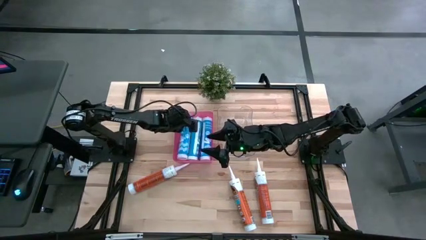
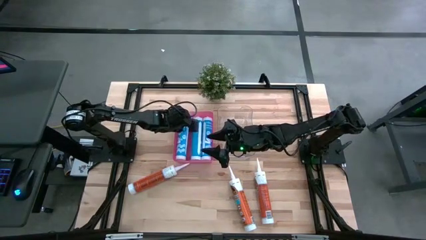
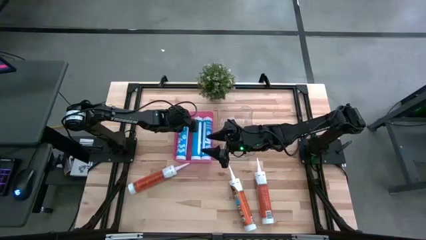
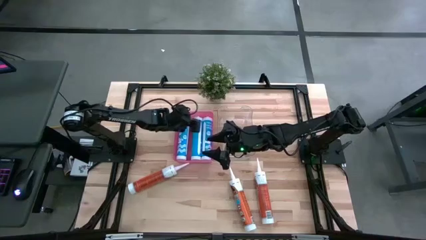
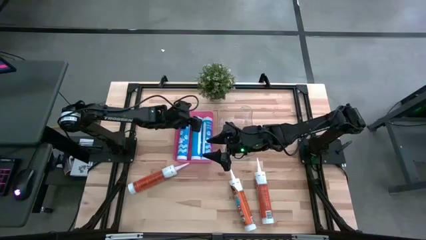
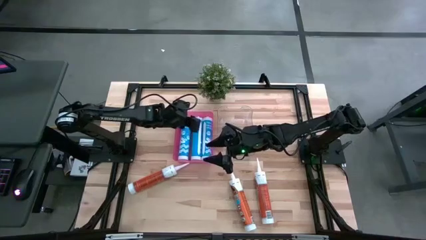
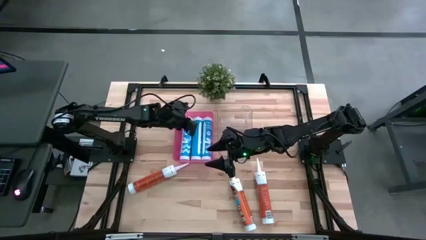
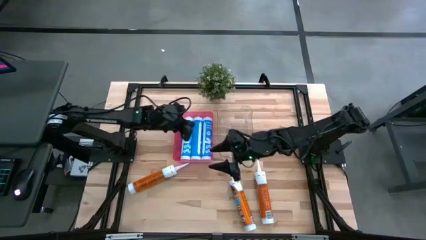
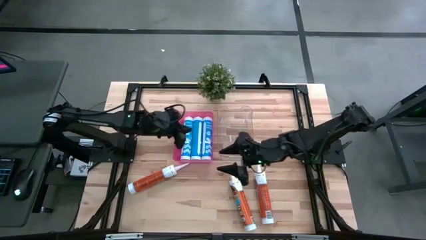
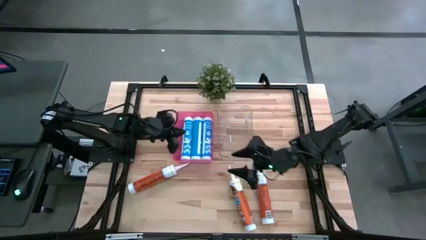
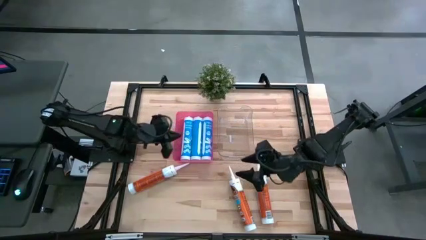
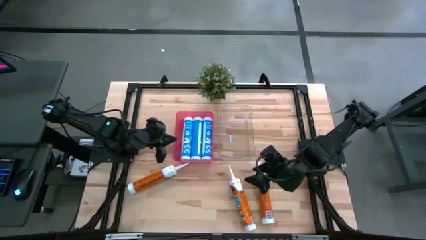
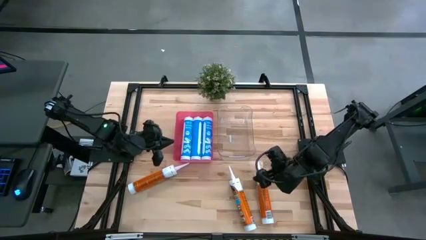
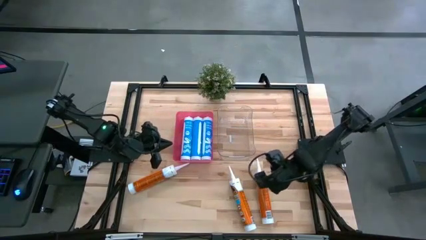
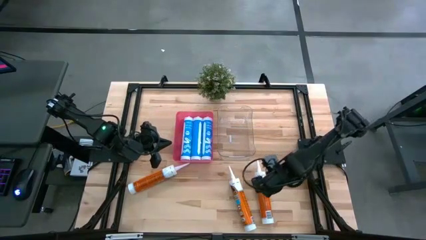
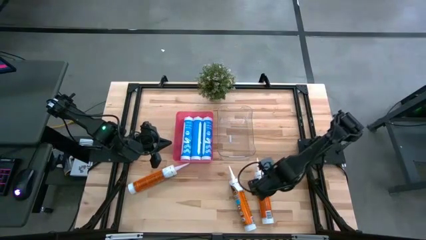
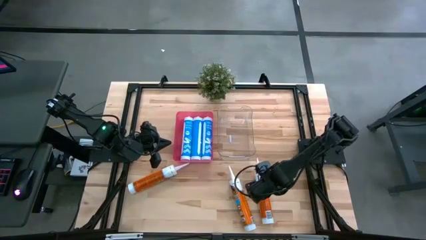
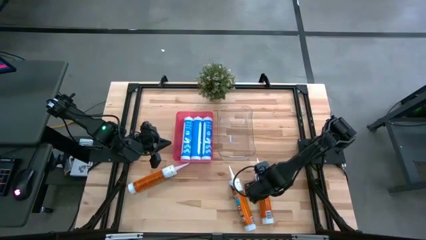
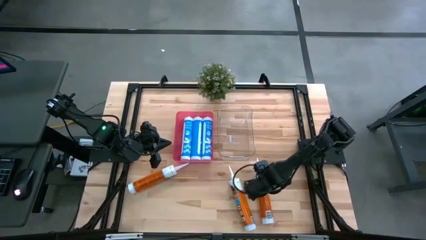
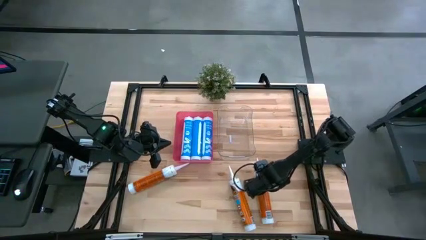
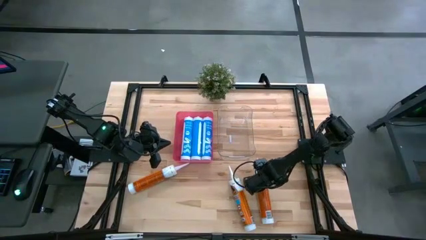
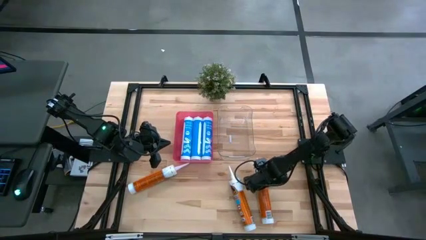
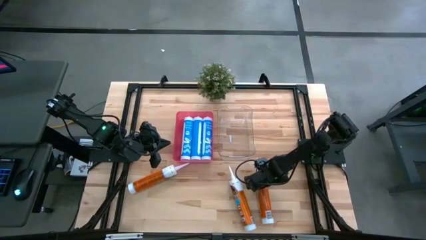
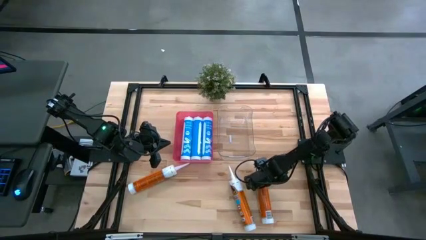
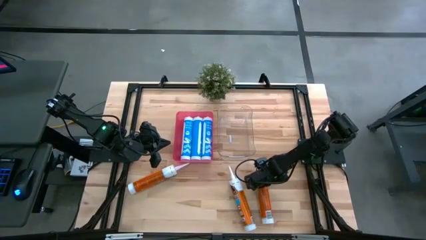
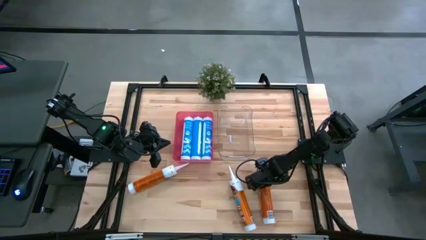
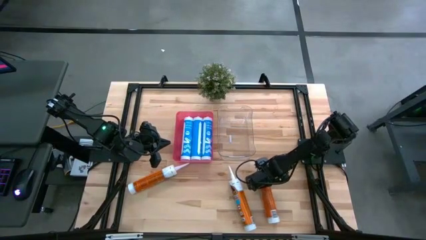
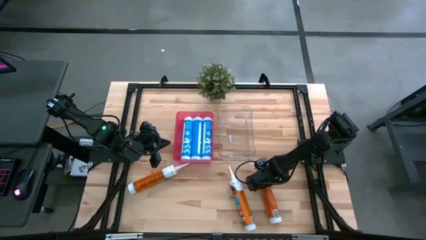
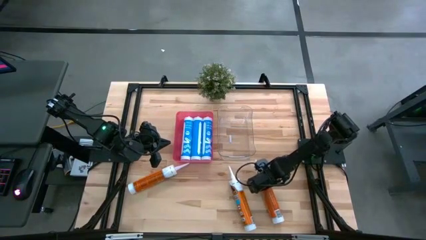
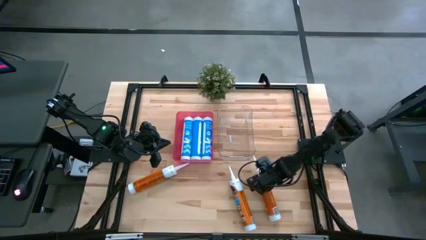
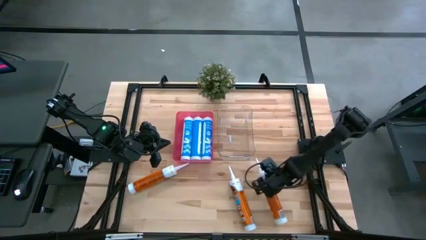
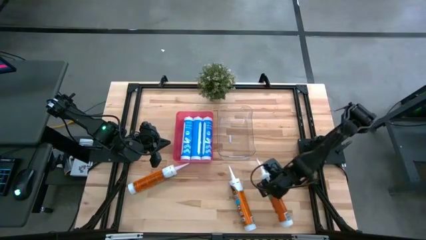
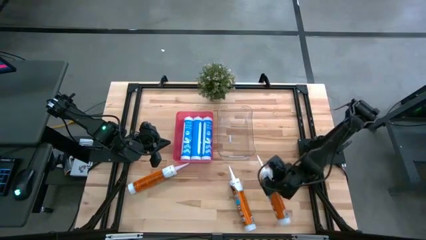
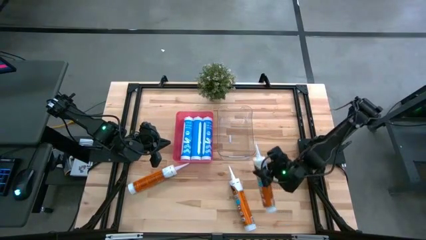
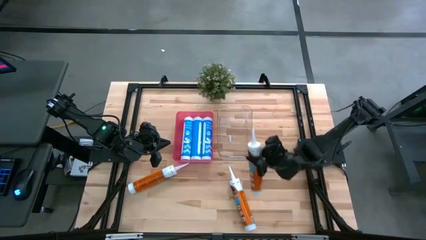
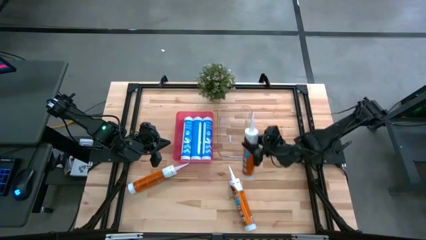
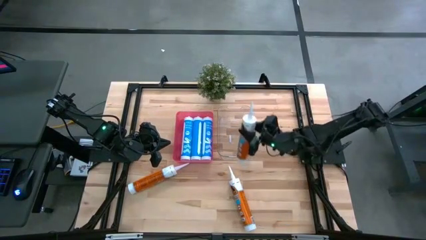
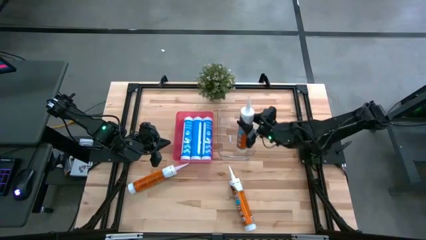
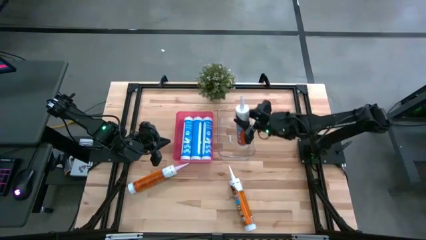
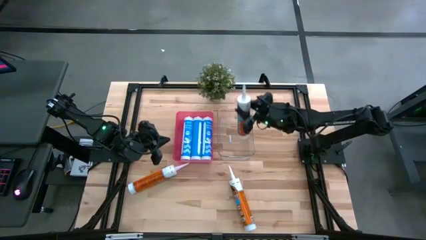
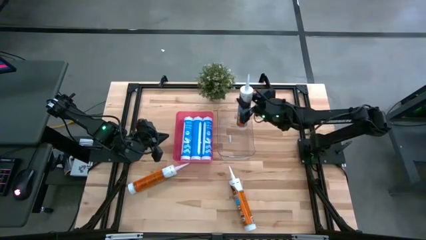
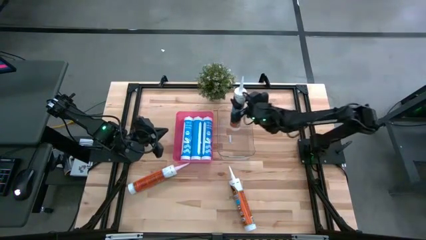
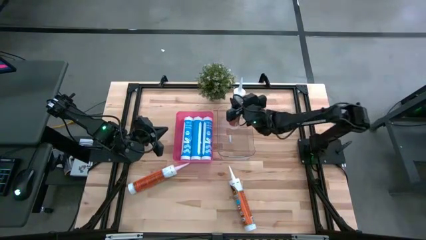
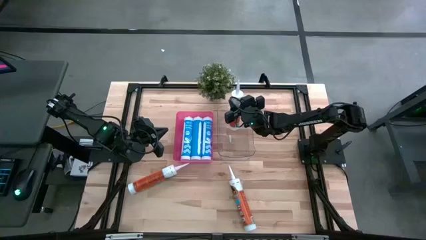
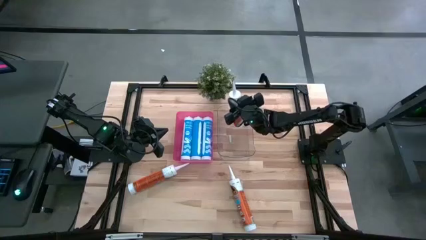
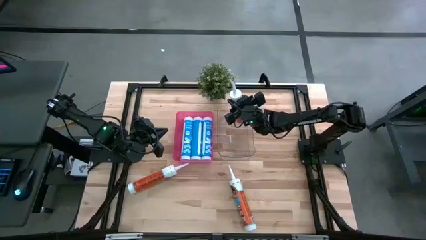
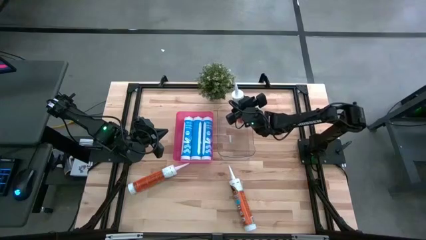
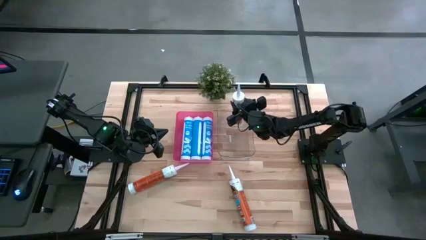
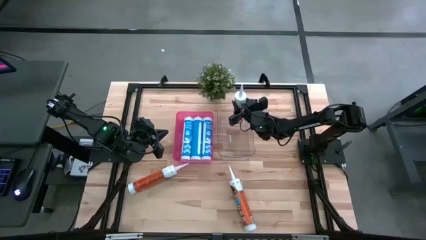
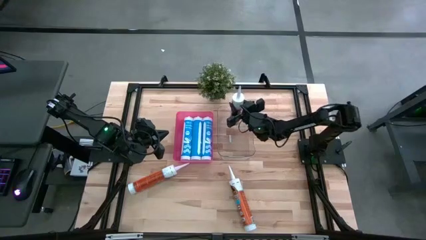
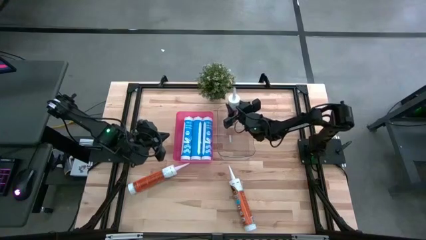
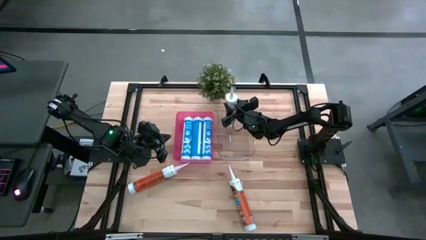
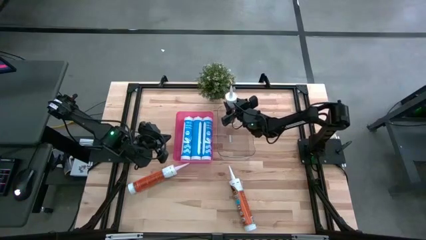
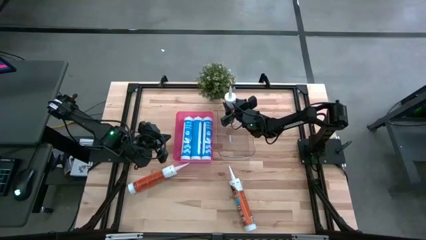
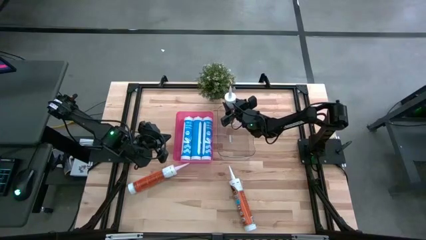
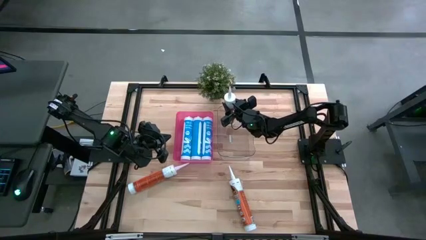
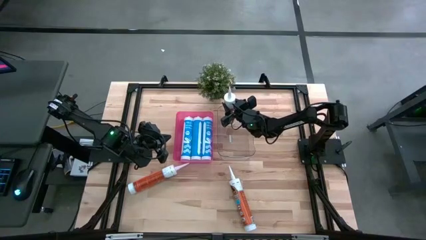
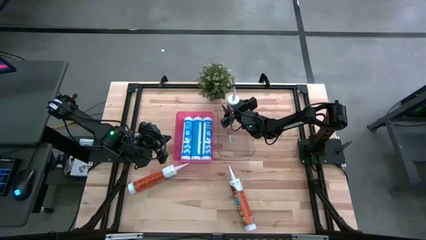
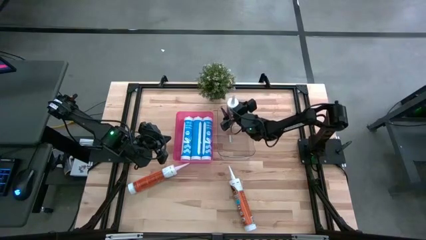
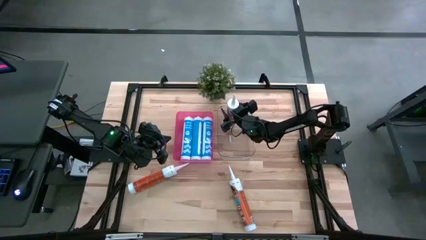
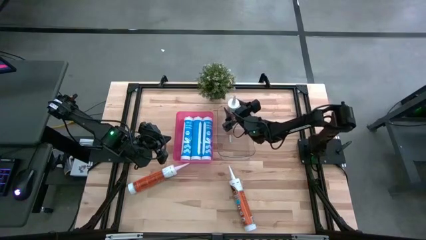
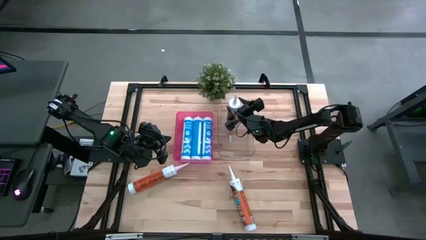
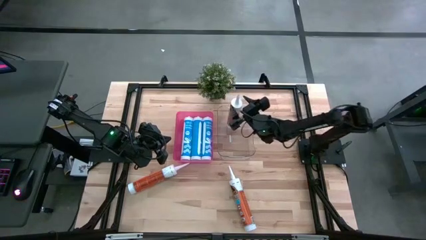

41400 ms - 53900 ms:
Task: Pick & place silicon tubes, Sealant and Lysol wipes
Put the right orange sealant into the transparent bin
